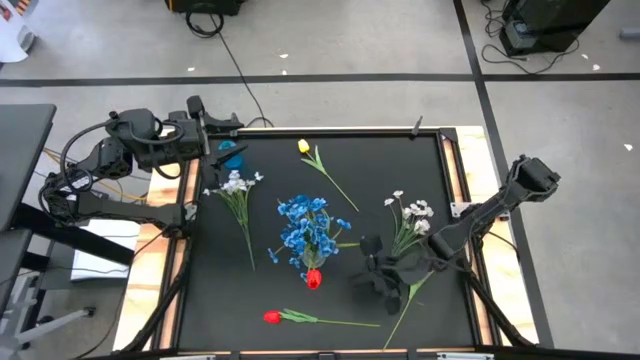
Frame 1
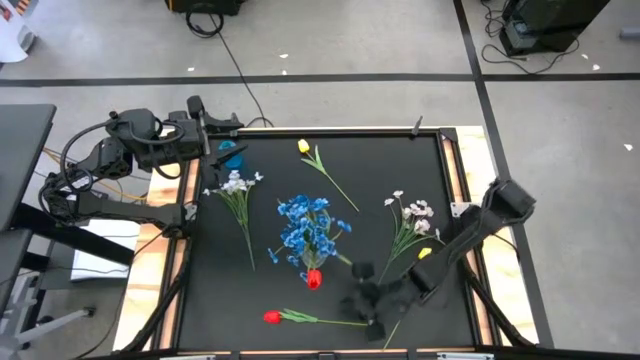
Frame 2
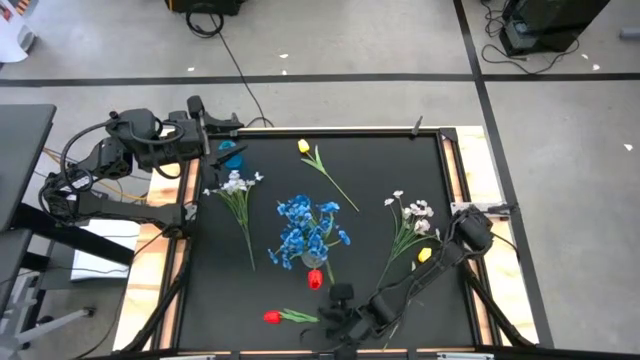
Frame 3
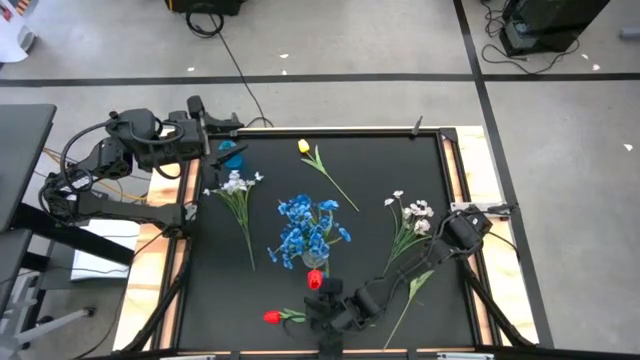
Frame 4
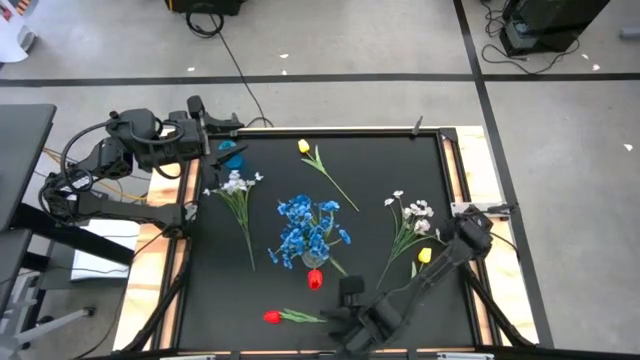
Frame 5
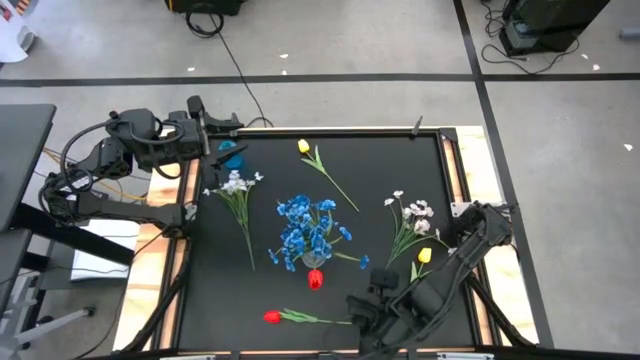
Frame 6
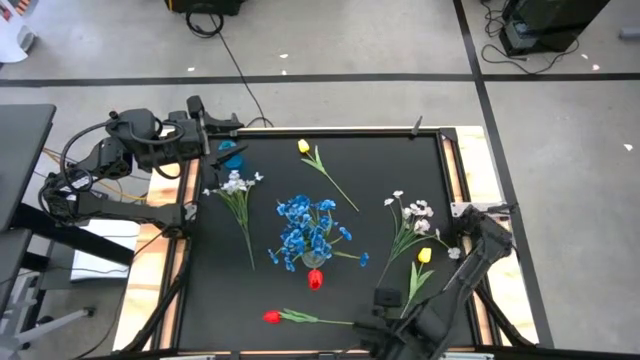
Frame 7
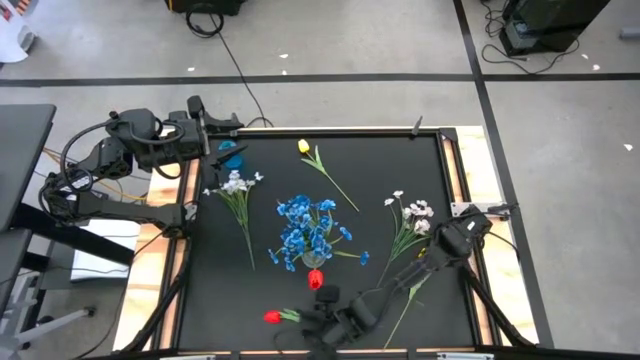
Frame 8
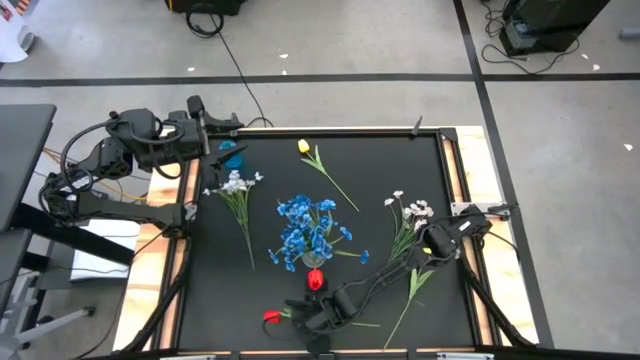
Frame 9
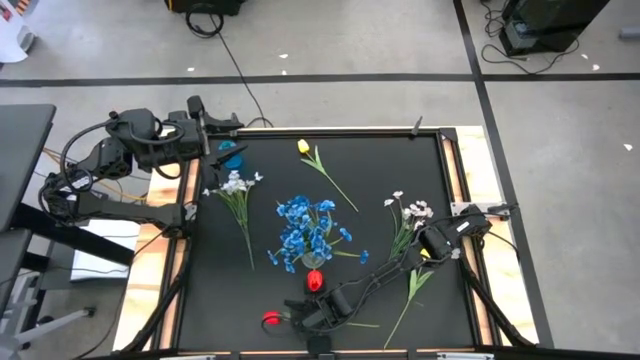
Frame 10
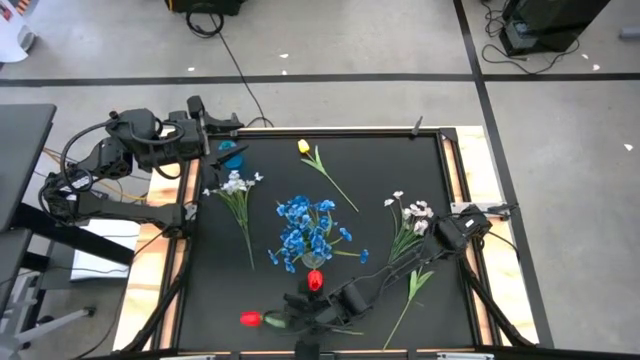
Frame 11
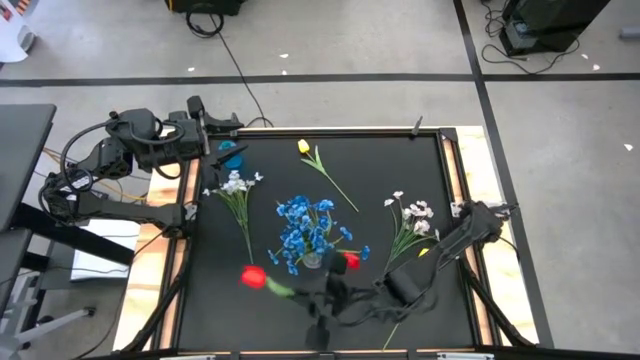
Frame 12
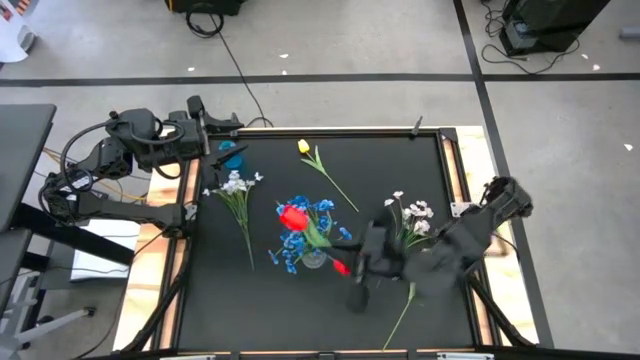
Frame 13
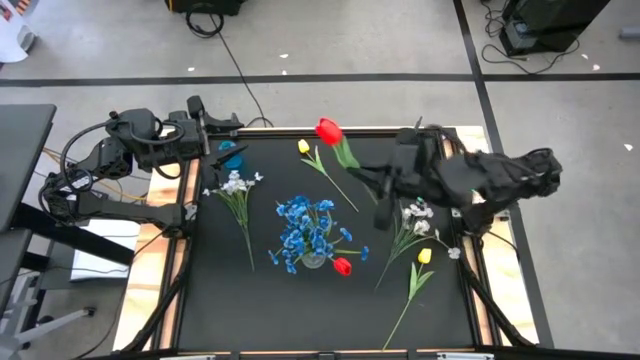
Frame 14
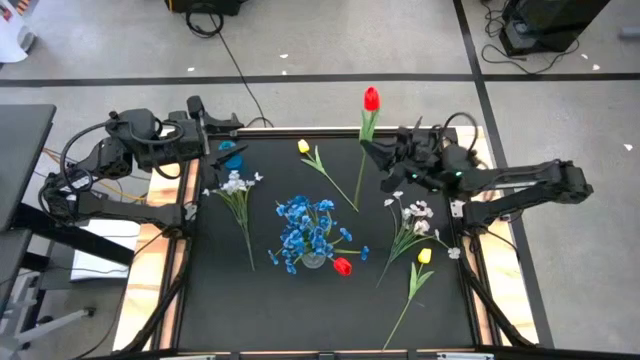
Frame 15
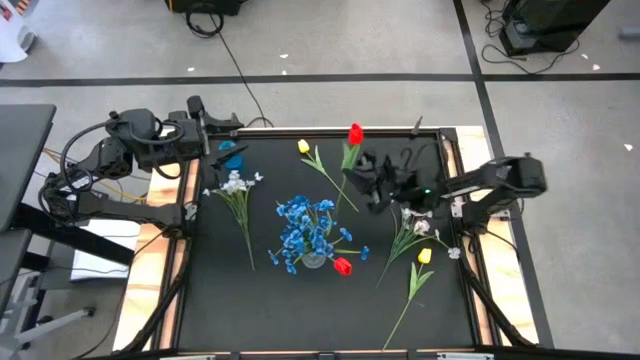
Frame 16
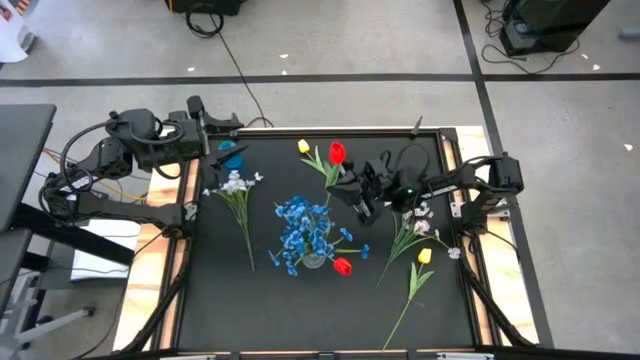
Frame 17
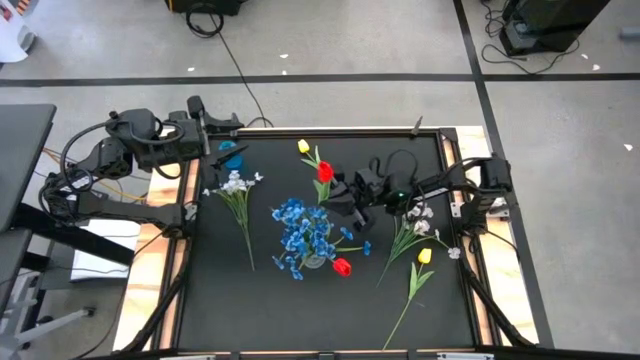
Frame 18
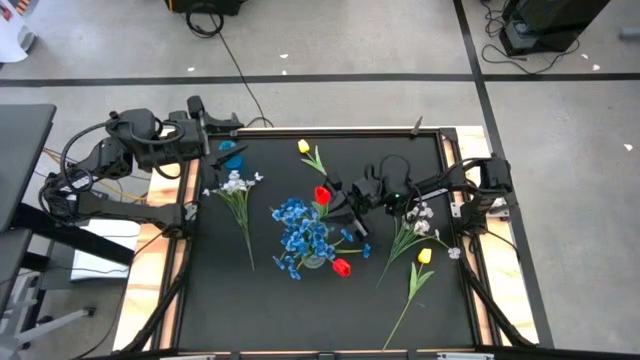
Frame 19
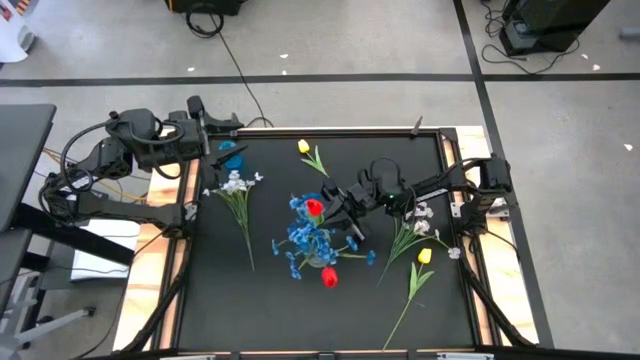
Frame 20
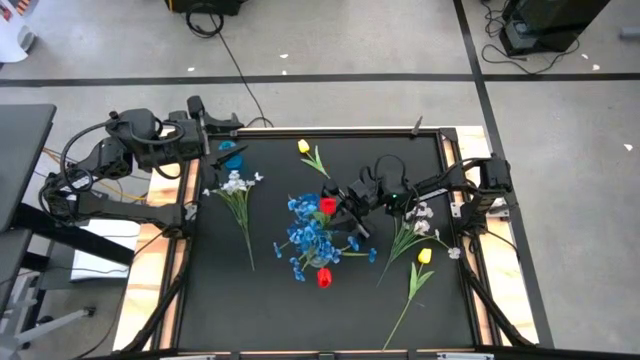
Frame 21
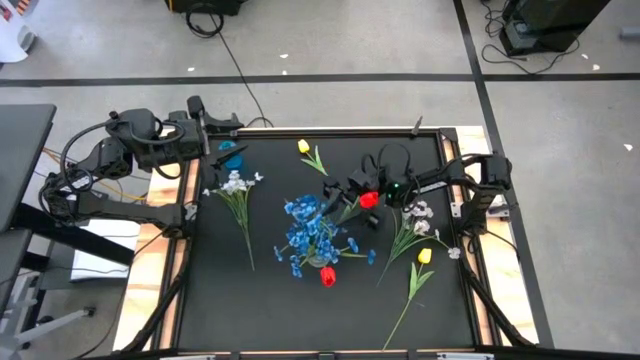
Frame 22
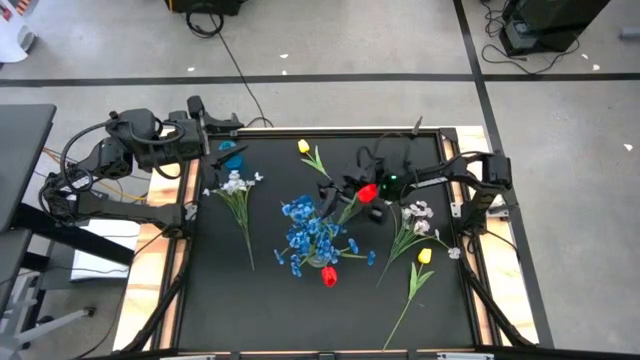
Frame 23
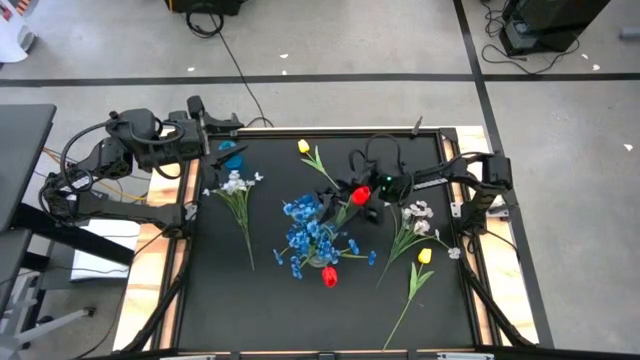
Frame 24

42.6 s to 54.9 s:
Task: Sort flowers into vase by color
Put the red flower into the transparent vase

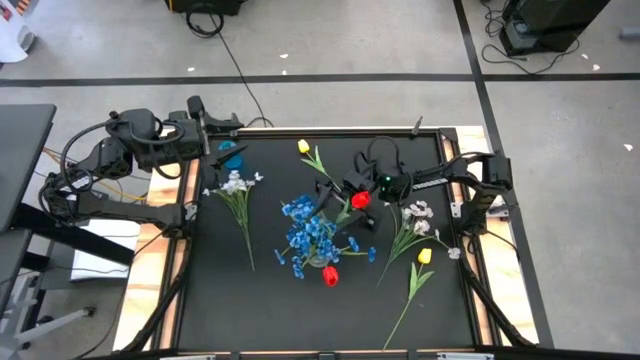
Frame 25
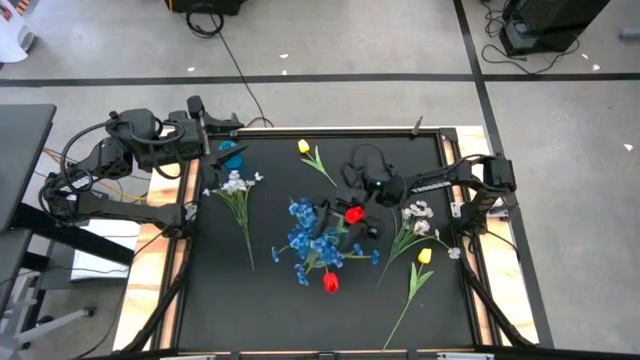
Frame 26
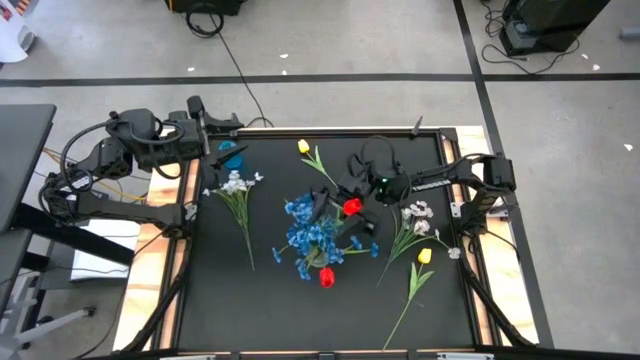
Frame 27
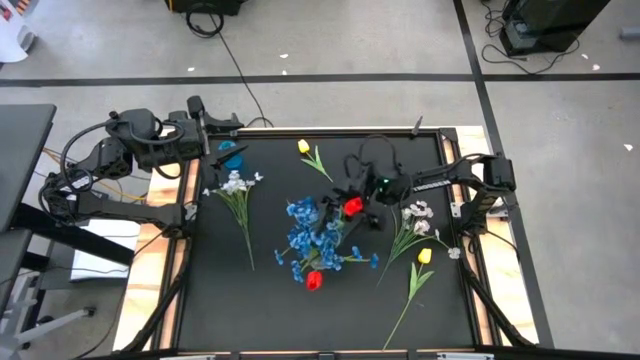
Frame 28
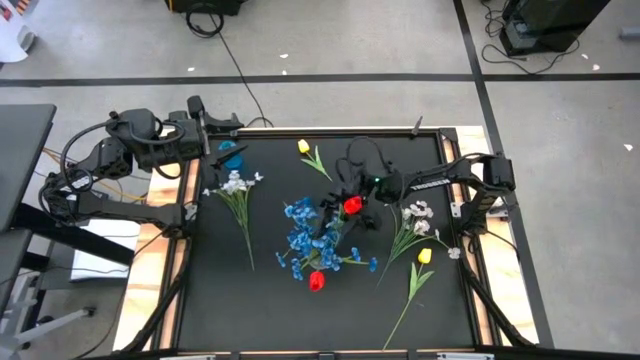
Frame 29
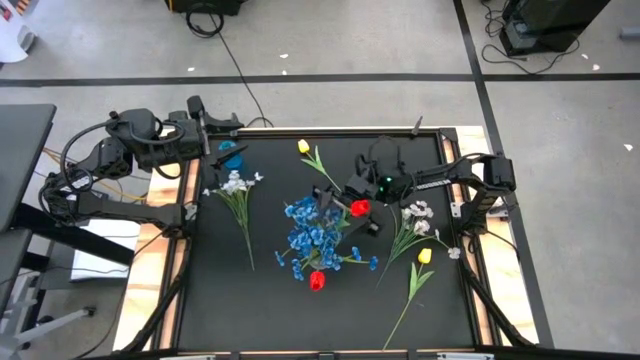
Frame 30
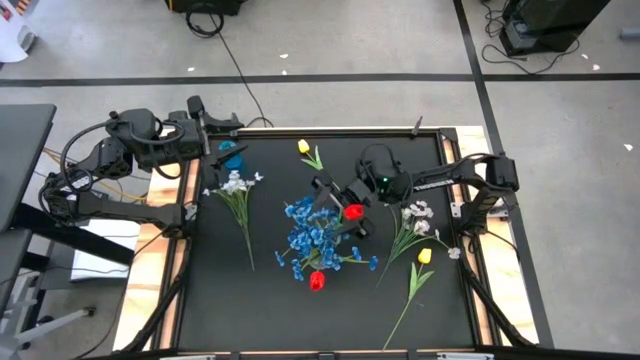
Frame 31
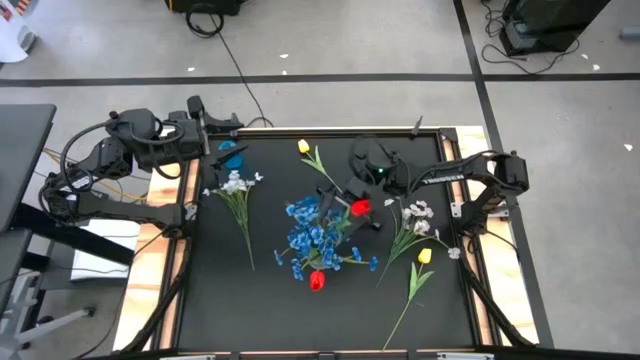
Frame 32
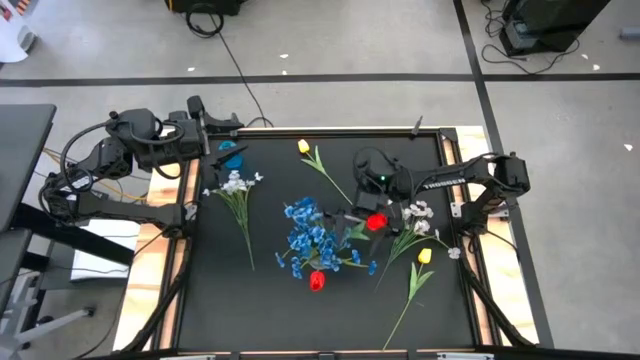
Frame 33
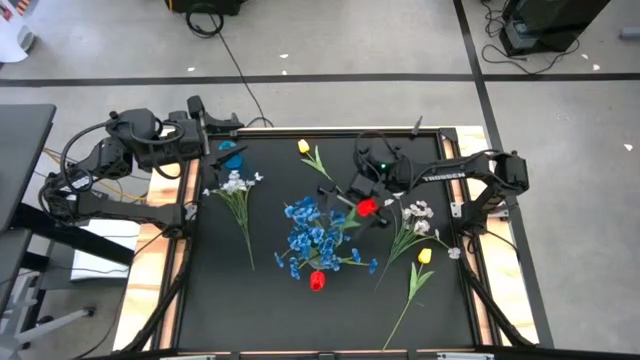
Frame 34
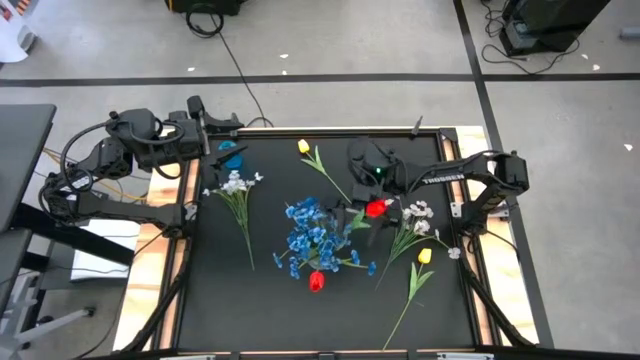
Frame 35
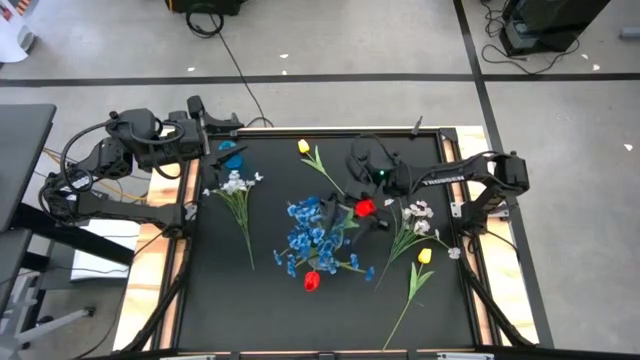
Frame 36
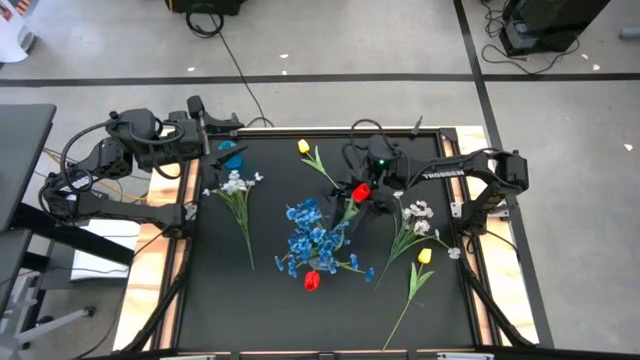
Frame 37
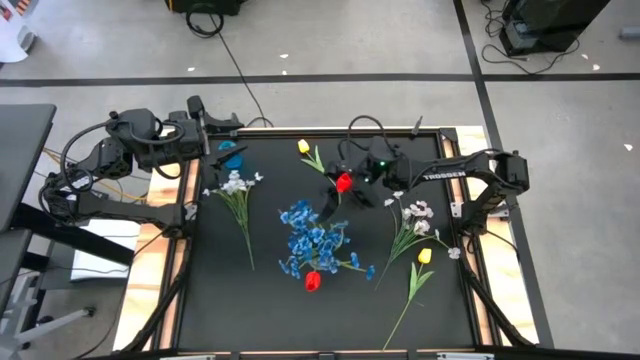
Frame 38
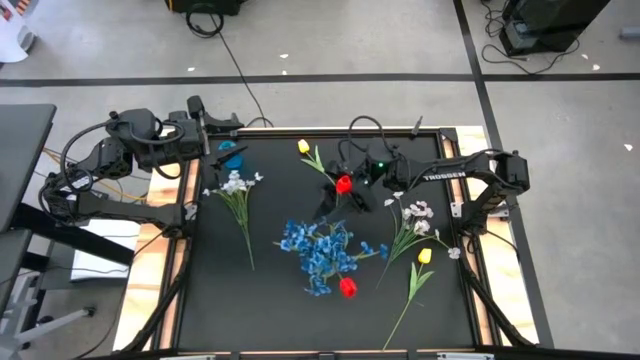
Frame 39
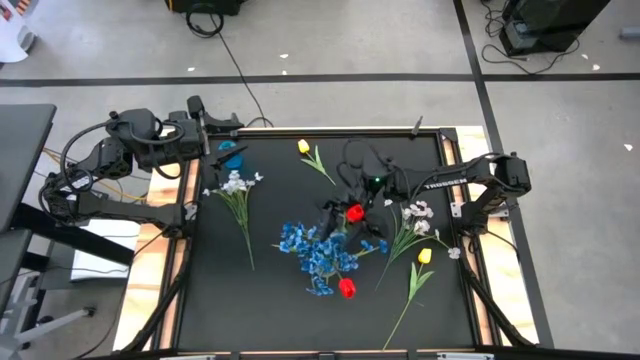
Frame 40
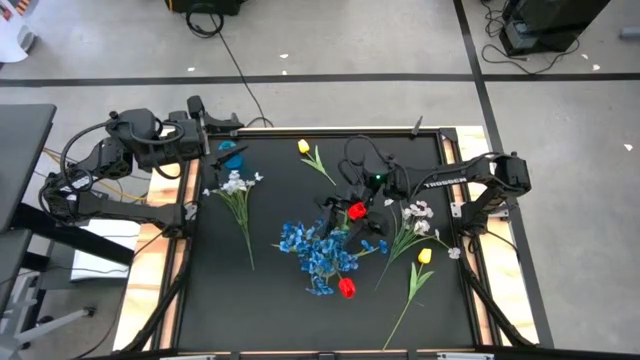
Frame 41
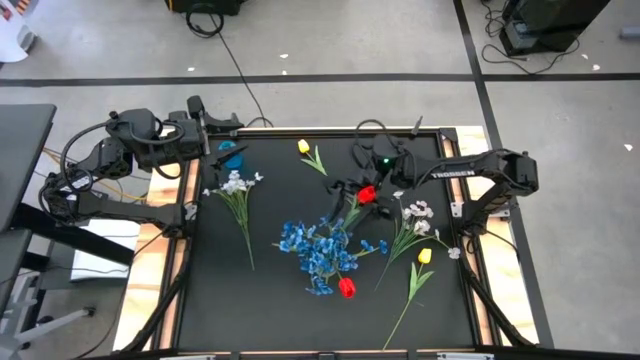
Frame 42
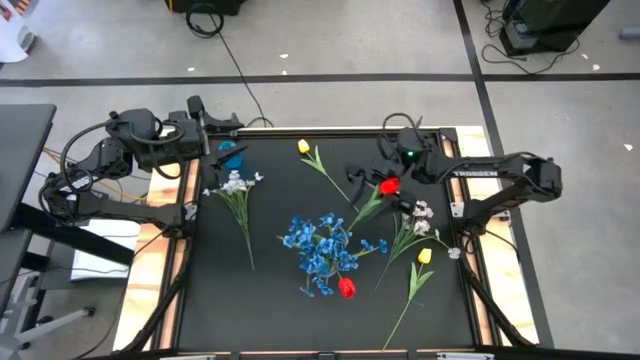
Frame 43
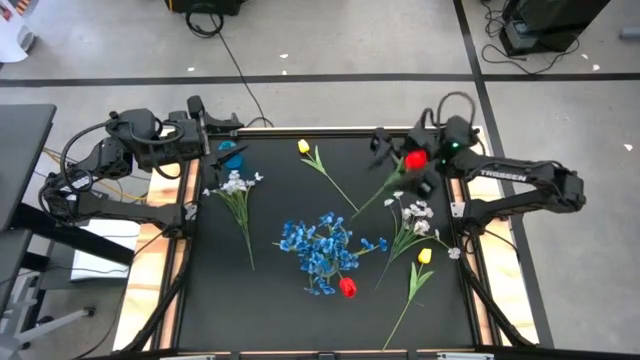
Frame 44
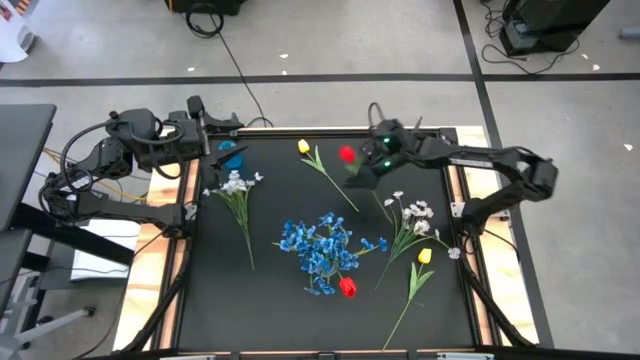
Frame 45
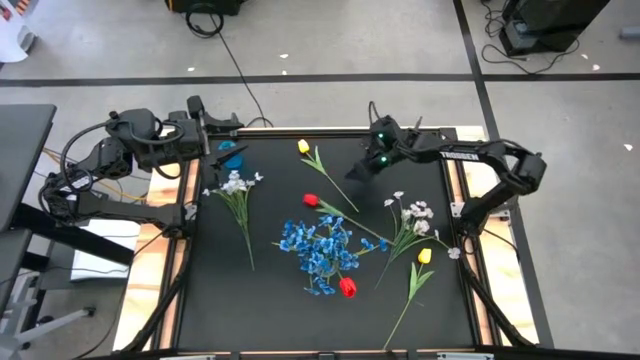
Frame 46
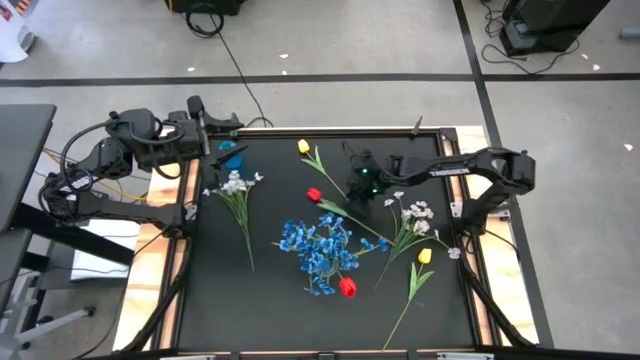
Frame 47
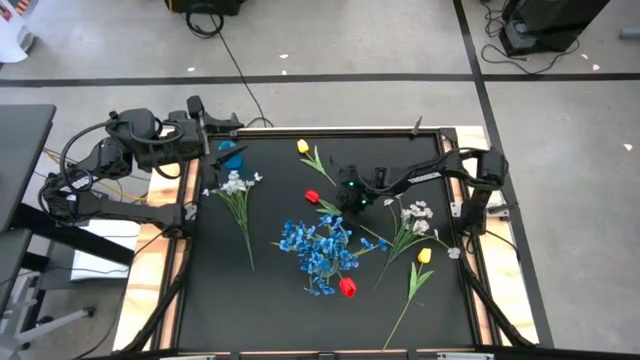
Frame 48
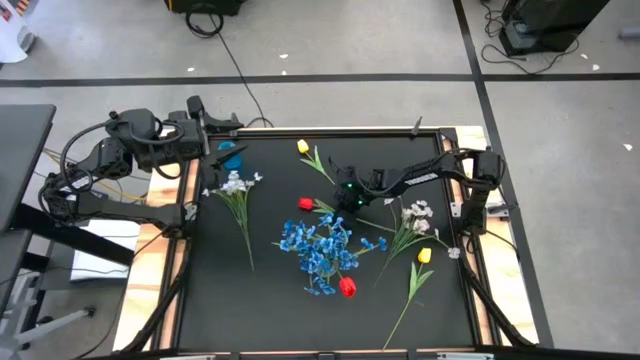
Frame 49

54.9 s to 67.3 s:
Put the red flower into the transparent vase
